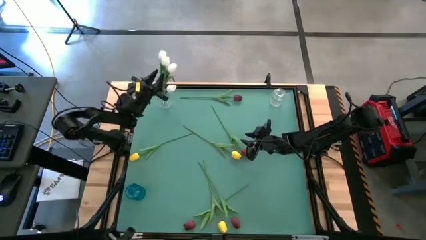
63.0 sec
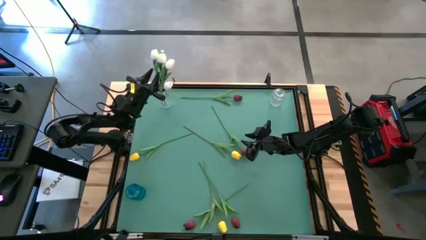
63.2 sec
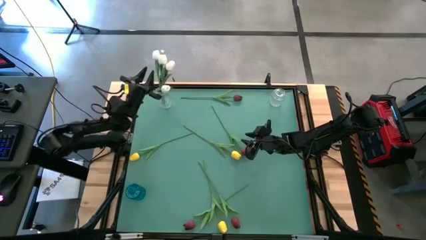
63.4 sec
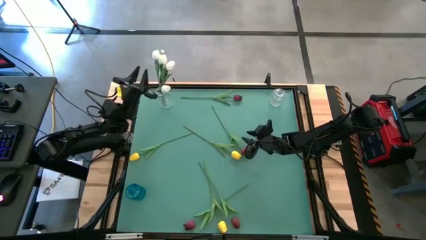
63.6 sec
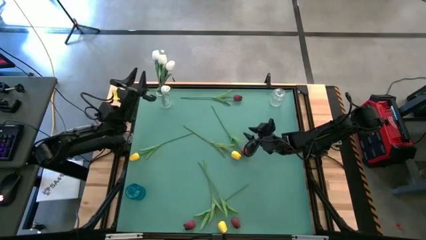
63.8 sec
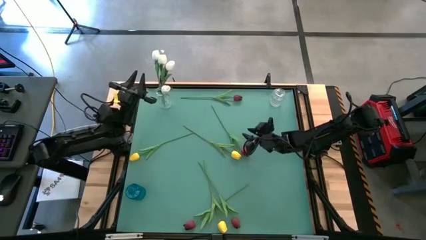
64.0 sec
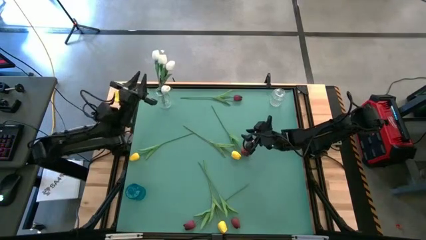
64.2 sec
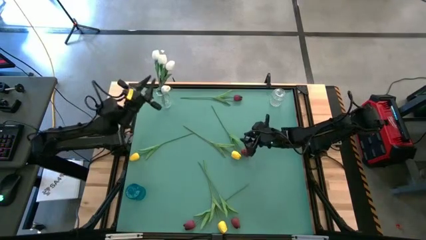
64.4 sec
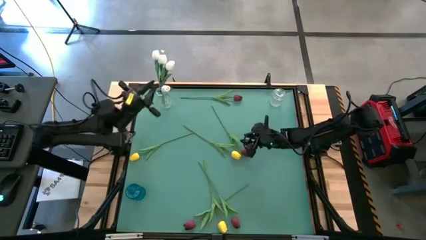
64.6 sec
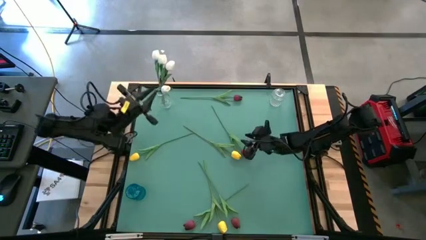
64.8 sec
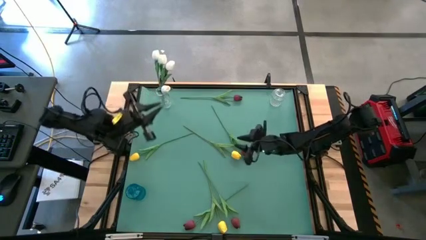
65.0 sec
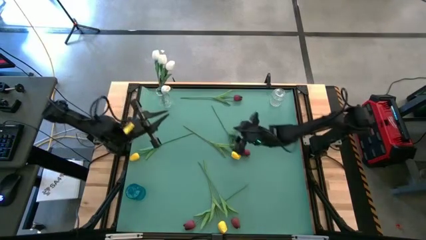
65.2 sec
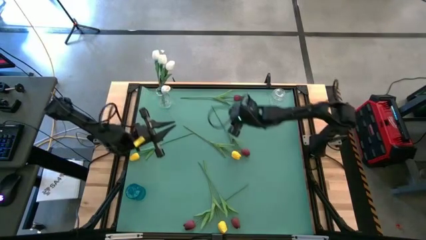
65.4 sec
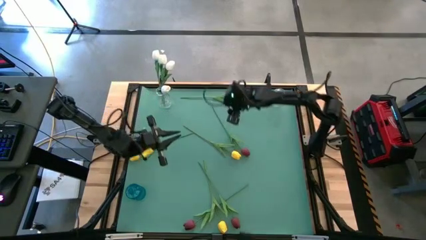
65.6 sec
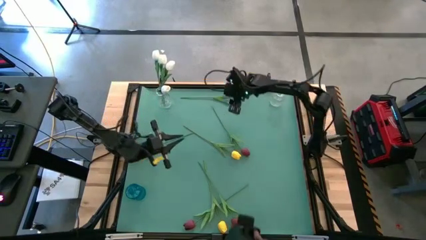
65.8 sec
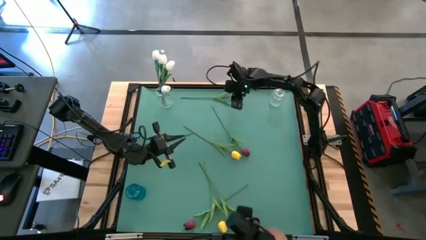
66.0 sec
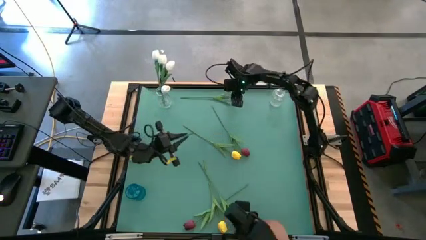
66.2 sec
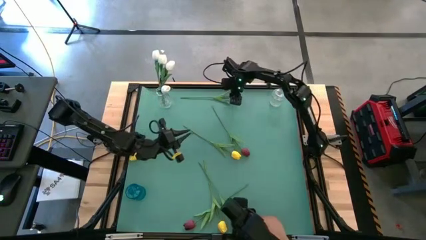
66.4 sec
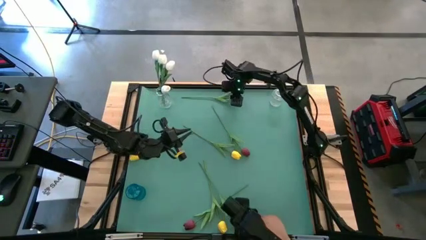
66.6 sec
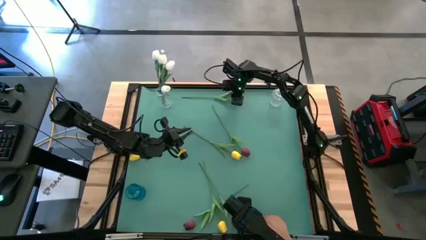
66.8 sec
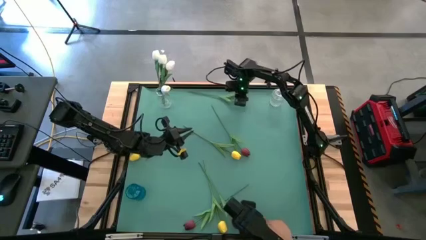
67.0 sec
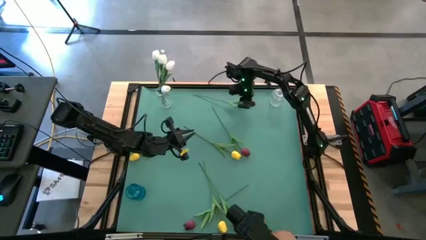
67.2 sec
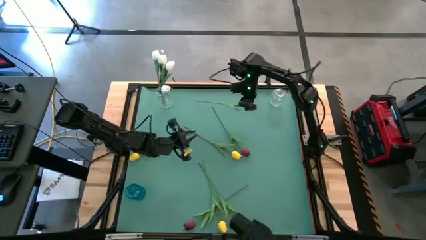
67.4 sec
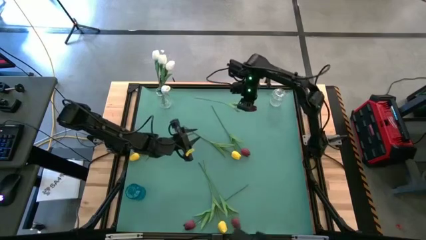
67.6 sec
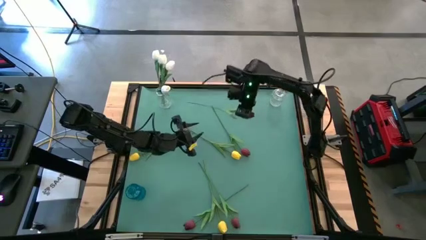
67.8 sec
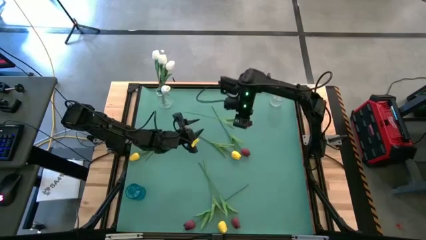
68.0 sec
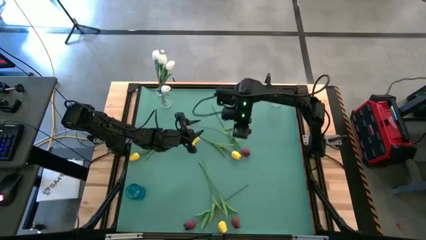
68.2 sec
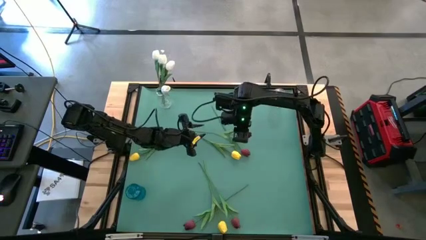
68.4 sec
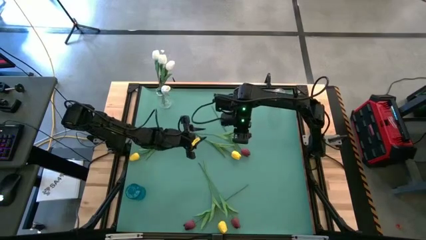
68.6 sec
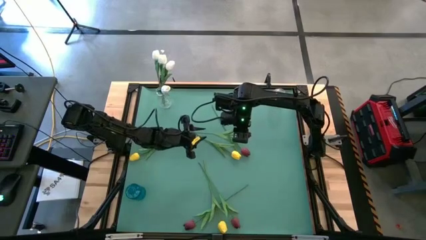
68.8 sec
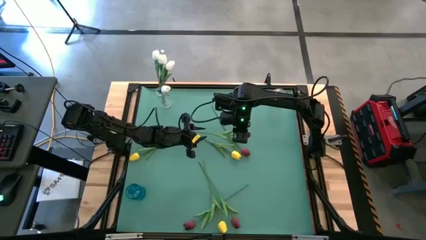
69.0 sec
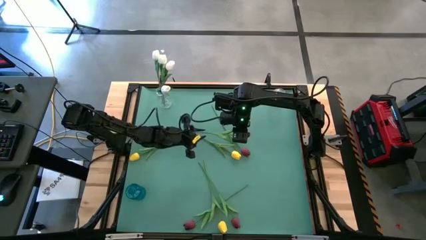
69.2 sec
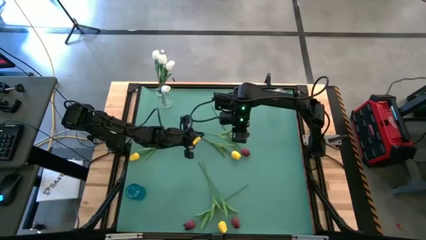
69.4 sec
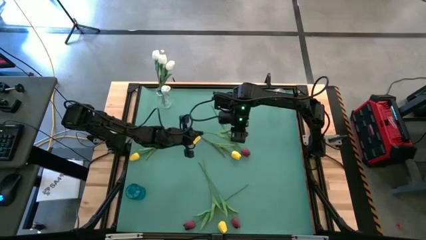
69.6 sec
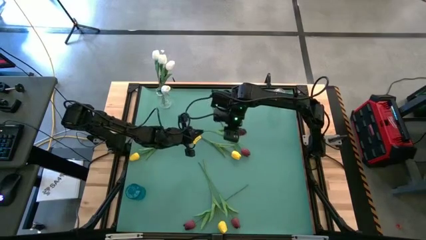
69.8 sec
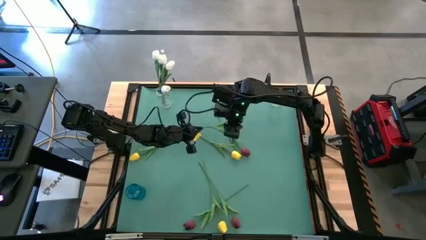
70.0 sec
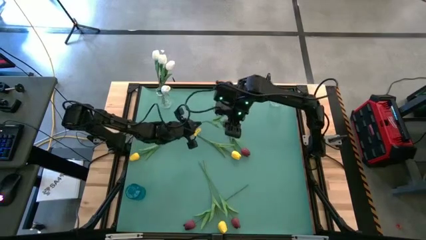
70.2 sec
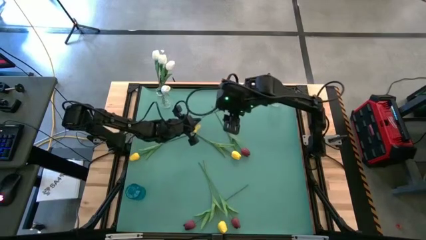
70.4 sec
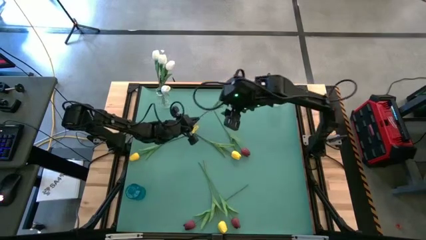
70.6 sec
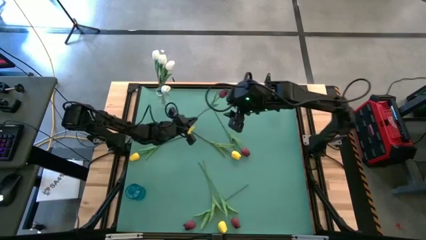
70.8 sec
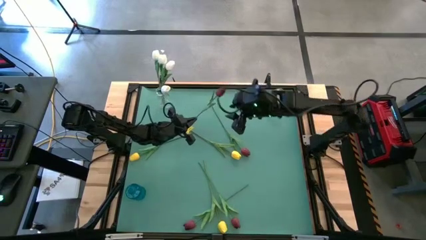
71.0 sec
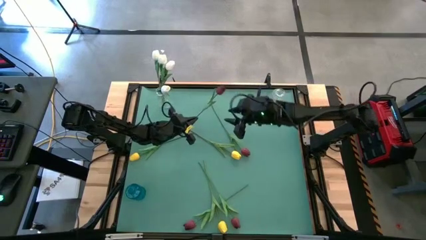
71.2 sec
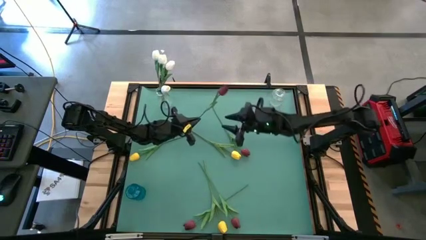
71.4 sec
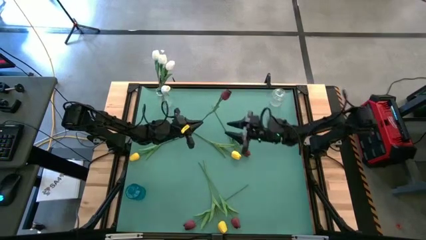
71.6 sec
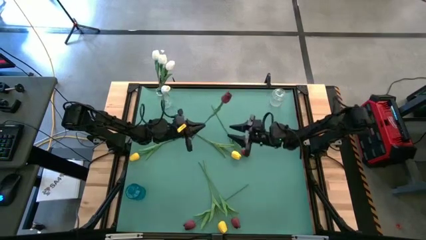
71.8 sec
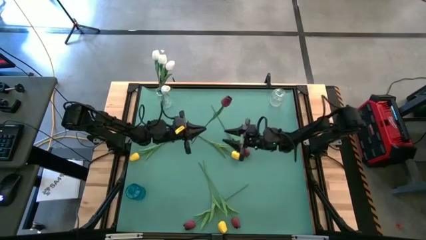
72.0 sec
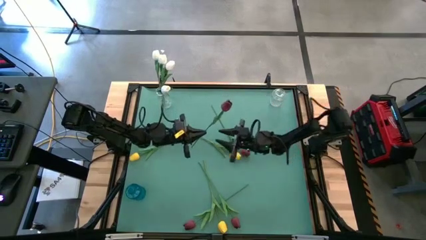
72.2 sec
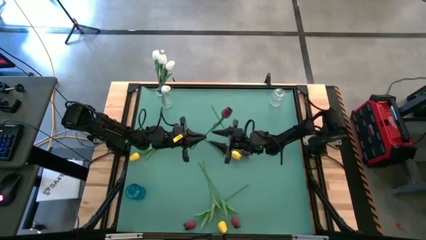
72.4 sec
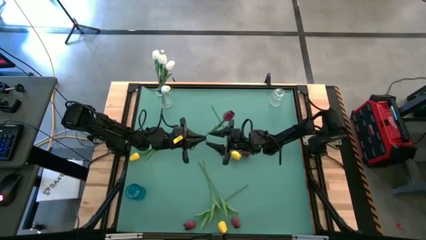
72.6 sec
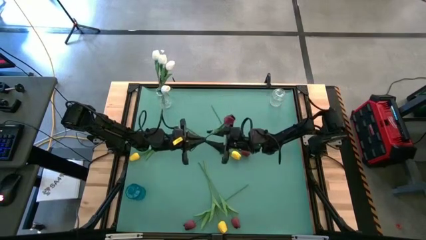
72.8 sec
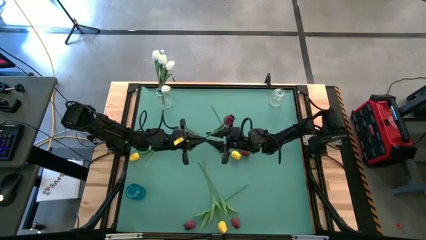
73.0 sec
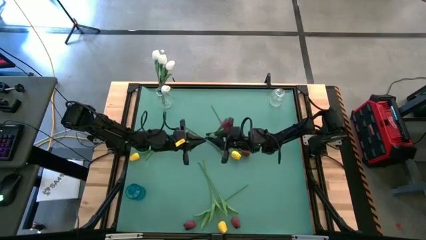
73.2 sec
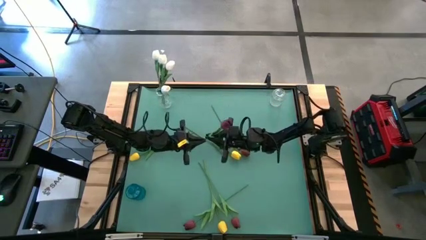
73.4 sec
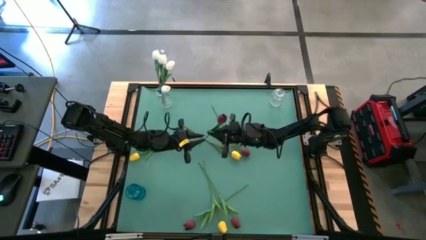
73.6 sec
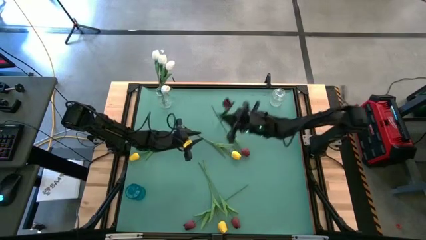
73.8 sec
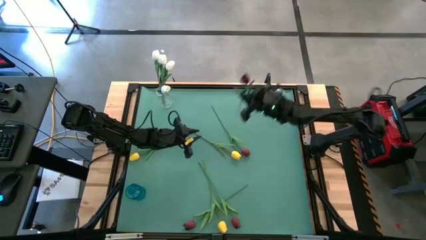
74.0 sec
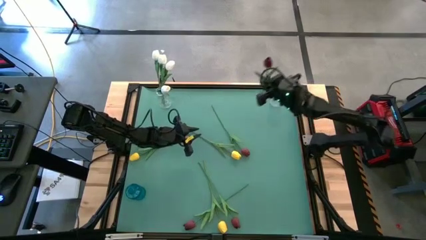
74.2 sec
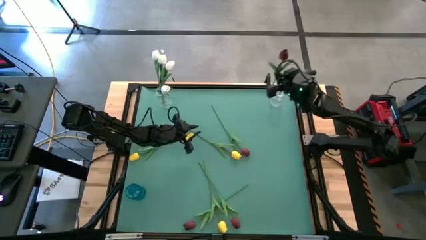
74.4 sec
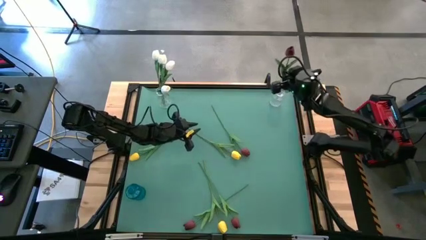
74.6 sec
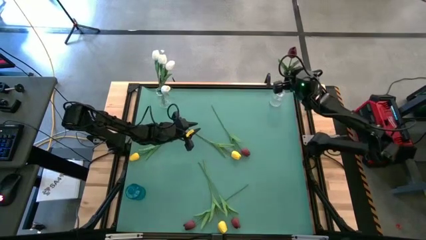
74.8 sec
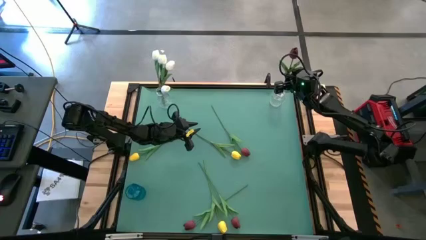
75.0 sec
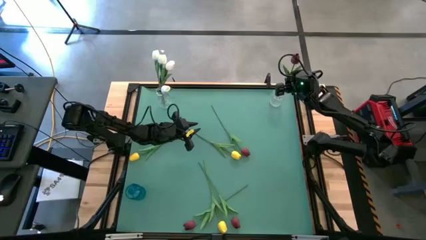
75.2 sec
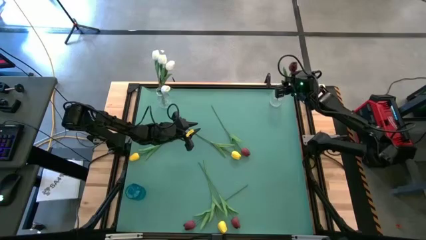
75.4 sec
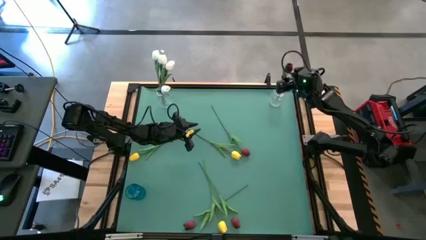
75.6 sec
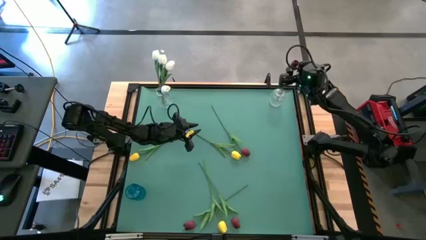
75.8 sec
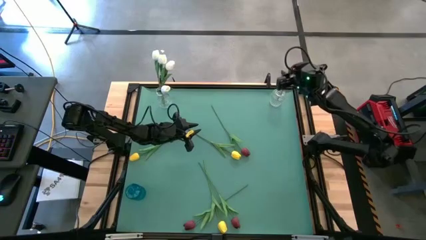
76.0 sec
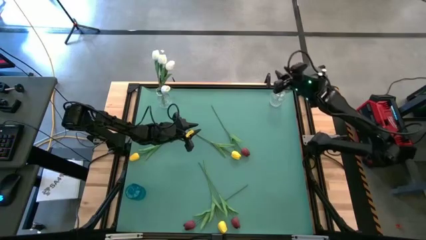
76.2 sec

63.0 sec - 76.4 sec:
Task: Sort flowers into vase by color
Put the red flower into the right transparent vase

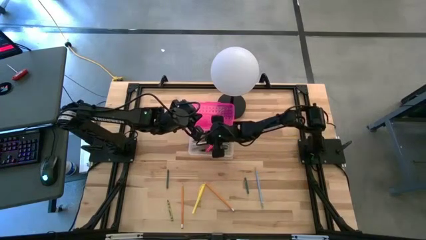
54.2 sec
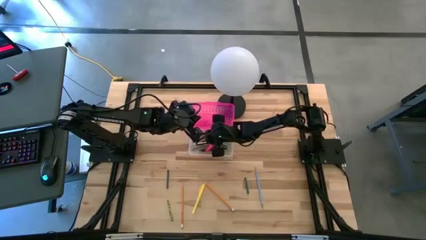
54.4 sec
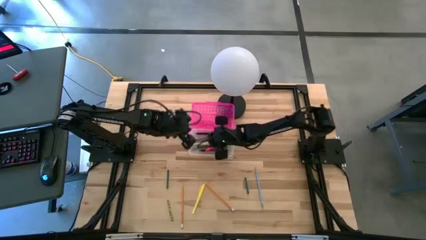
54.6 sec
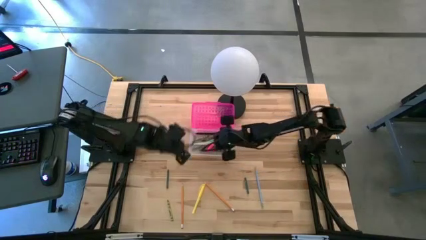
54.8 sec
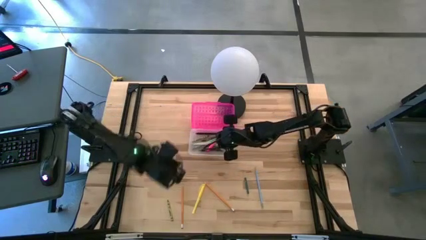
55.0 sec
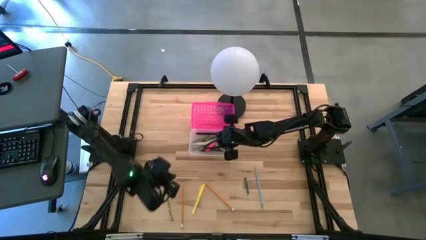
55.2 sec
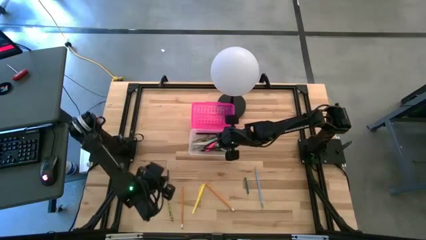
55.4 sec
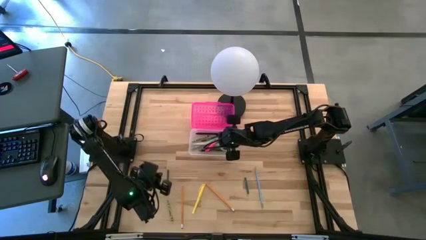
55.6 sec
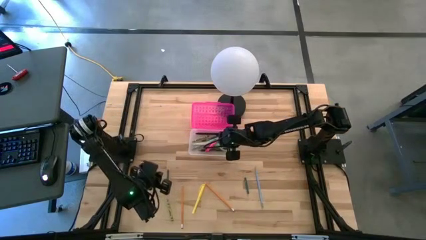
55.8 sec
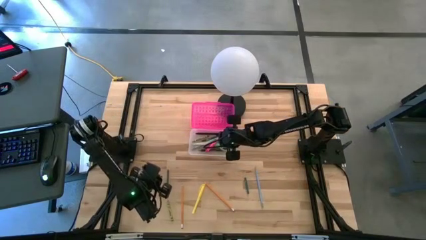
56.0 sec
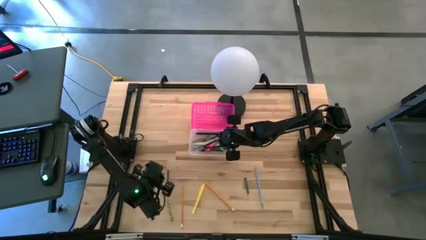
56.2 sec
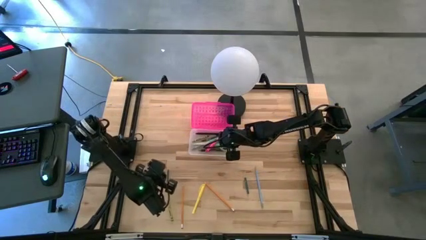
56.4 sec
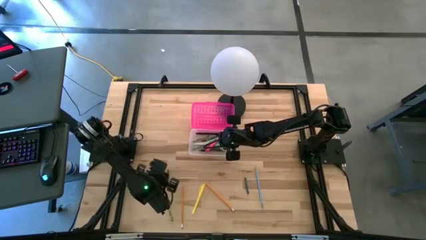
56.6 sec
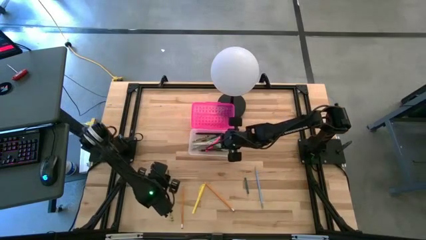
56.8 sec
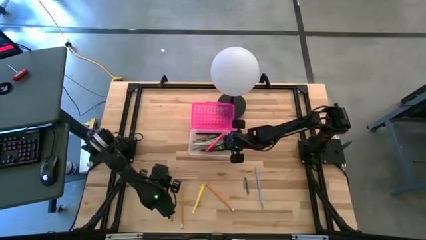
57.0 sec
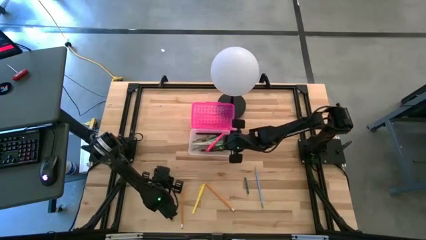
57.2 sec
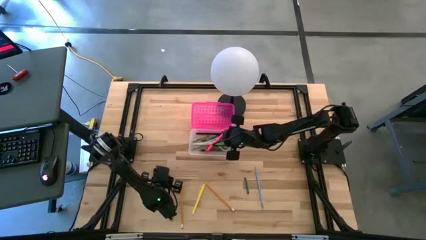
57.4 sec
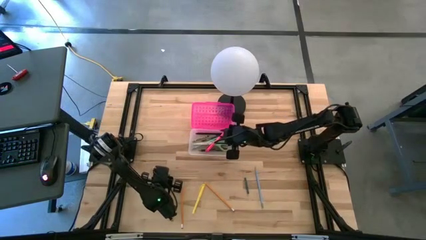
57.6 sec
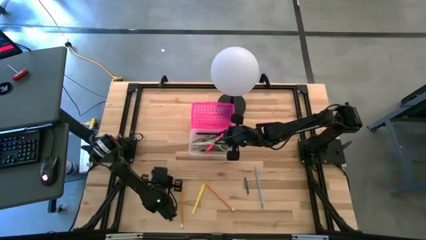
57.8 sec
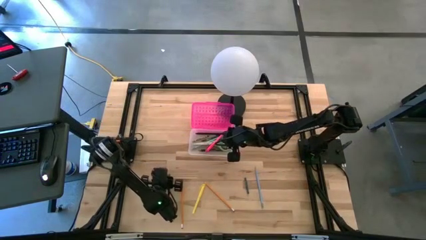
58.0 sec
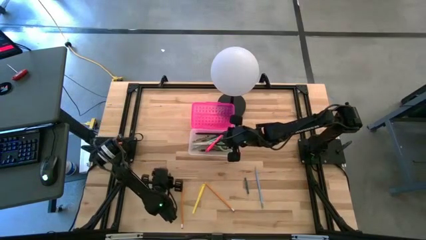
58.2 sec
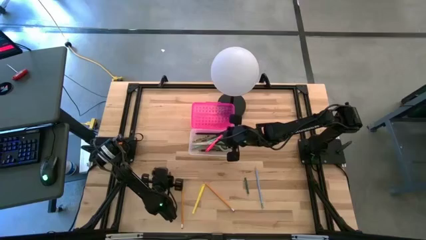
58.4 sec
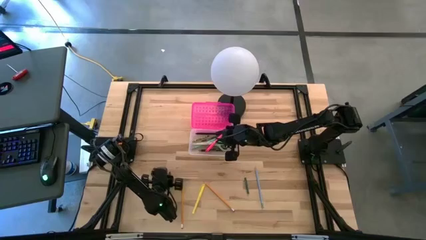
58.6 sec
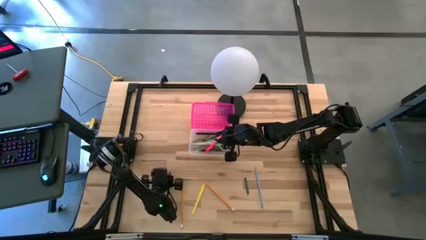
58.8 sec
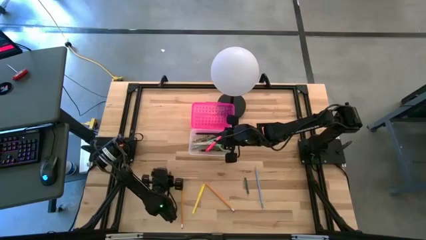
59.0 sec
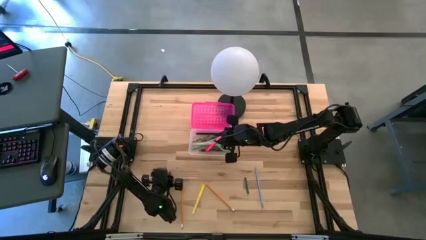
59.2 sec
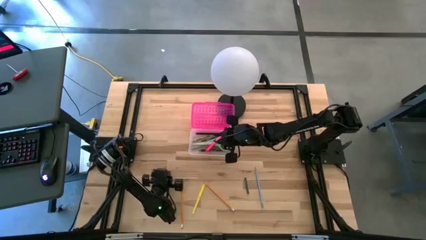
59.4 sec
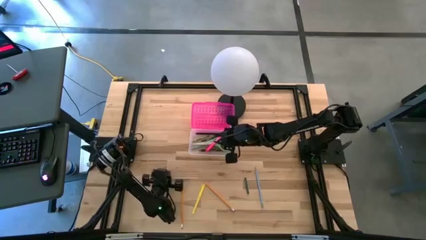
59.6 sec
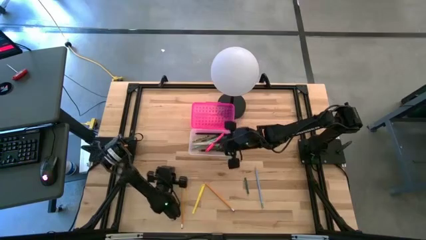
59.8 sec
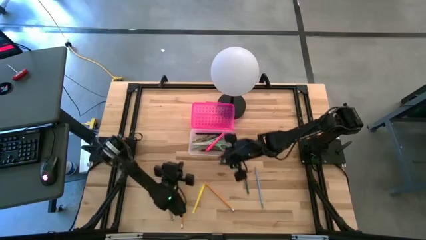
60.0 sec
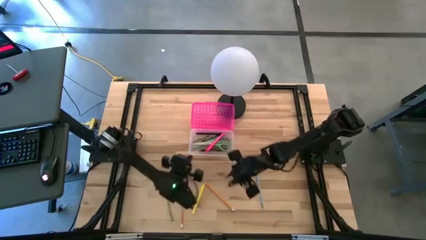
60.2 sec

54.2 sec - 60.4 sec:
Task: Pick & place school supplies into a supply box
Put the left dark green crayon into the pink supply box
